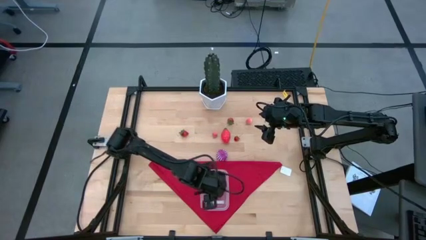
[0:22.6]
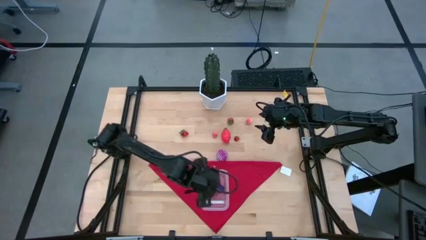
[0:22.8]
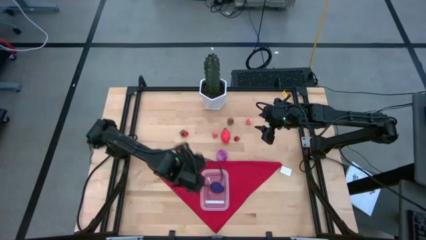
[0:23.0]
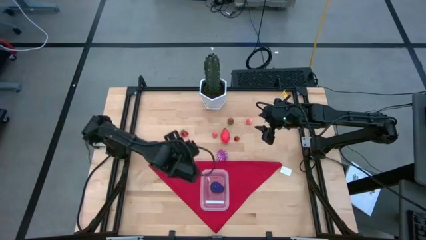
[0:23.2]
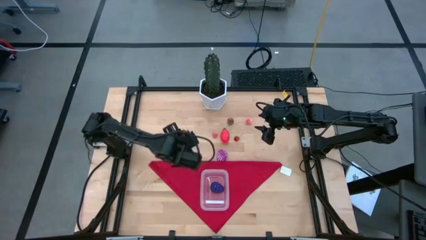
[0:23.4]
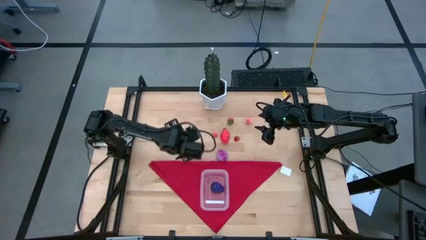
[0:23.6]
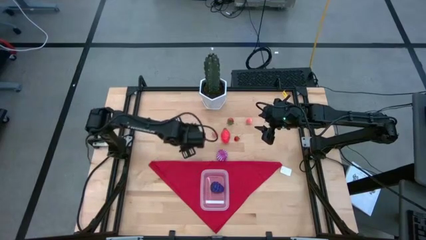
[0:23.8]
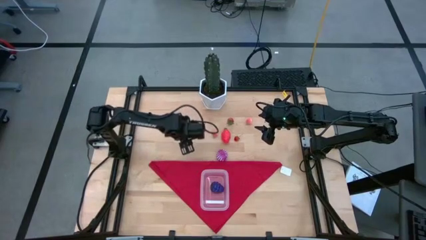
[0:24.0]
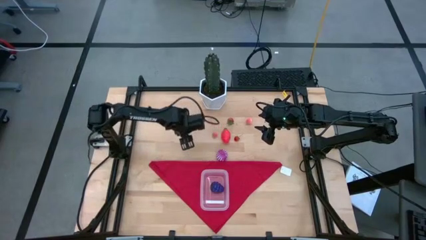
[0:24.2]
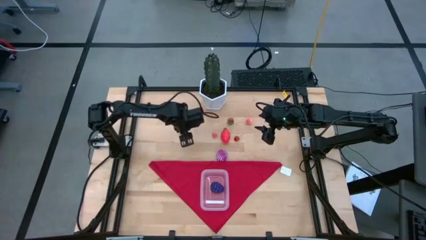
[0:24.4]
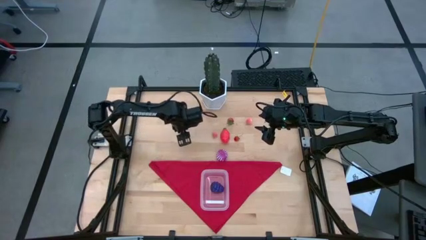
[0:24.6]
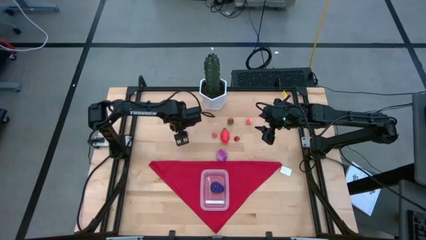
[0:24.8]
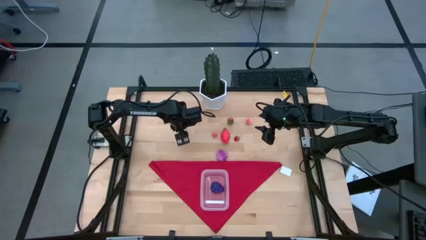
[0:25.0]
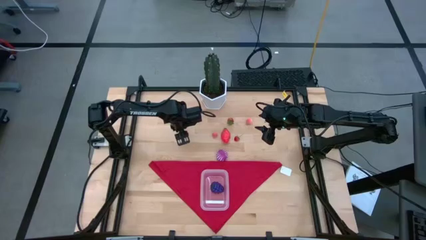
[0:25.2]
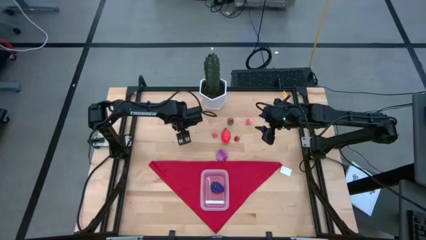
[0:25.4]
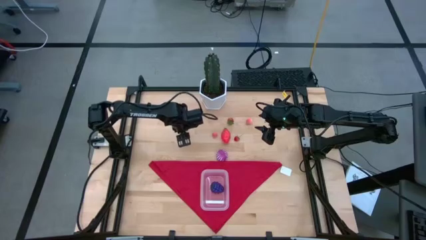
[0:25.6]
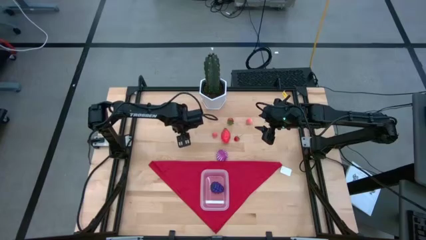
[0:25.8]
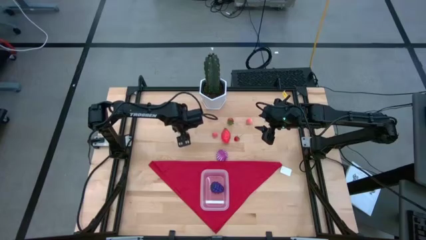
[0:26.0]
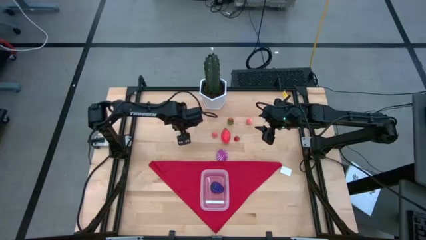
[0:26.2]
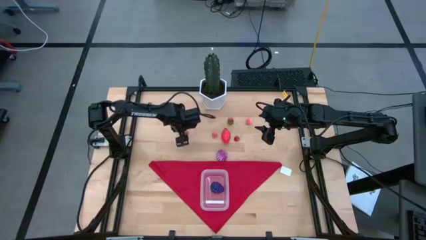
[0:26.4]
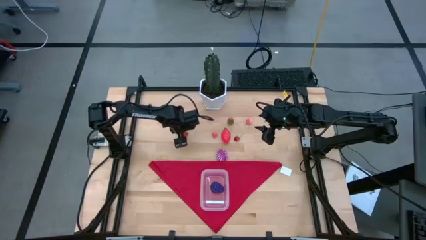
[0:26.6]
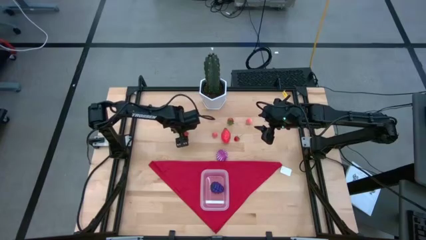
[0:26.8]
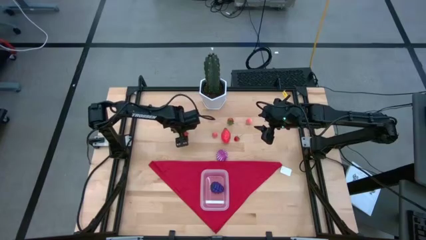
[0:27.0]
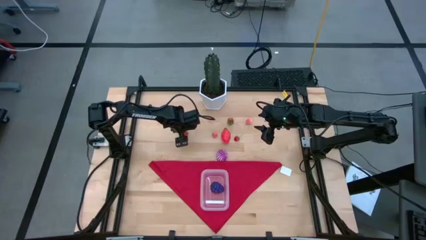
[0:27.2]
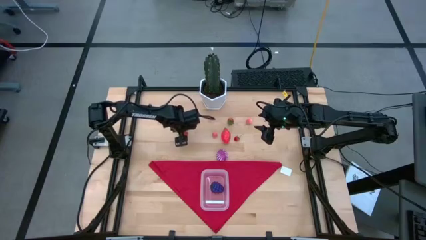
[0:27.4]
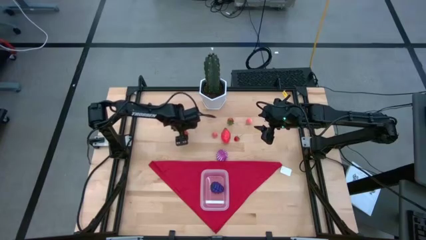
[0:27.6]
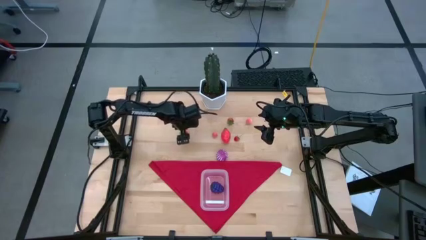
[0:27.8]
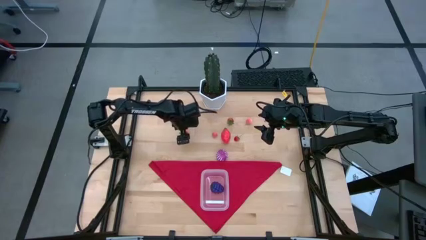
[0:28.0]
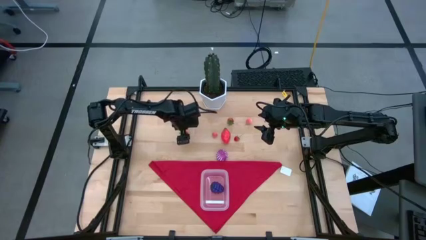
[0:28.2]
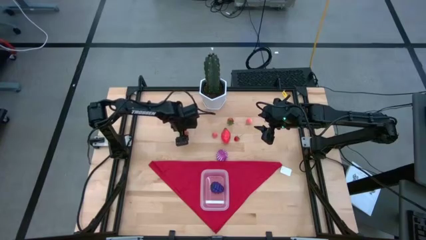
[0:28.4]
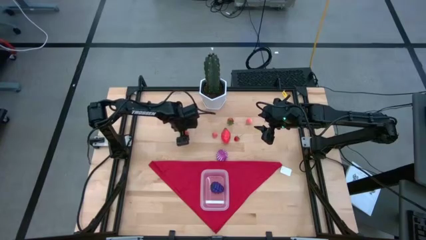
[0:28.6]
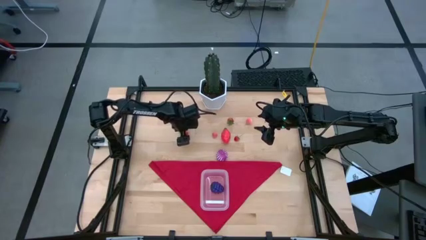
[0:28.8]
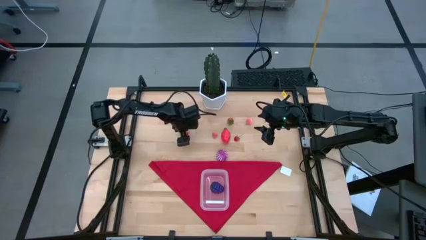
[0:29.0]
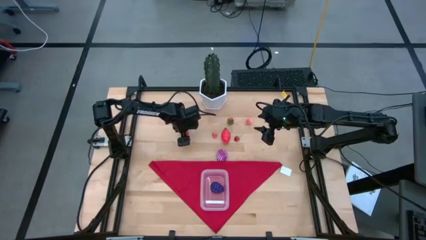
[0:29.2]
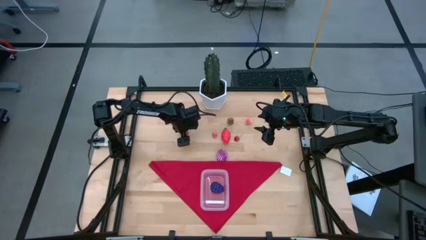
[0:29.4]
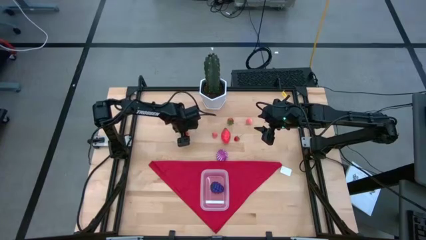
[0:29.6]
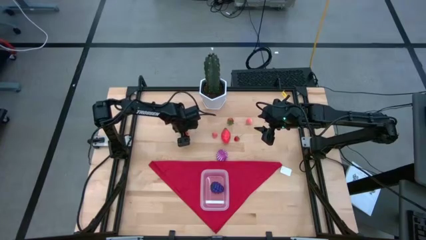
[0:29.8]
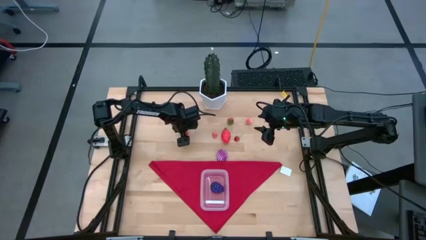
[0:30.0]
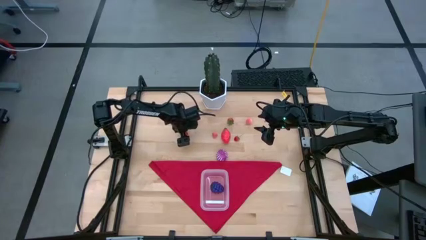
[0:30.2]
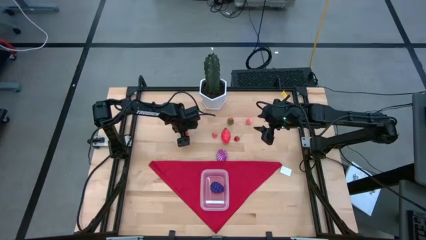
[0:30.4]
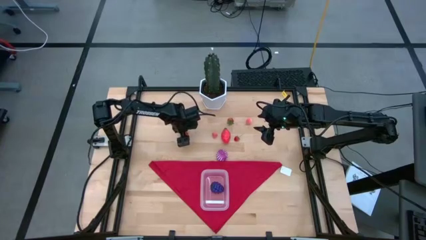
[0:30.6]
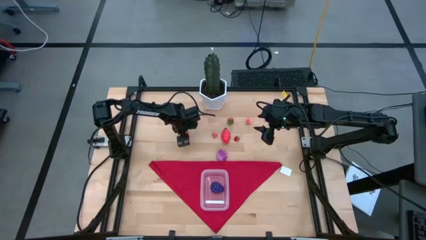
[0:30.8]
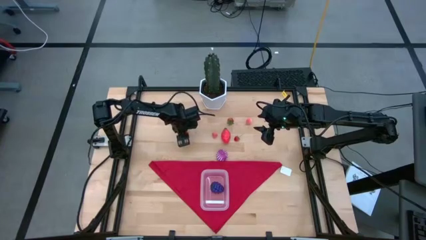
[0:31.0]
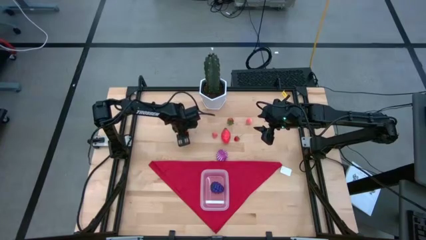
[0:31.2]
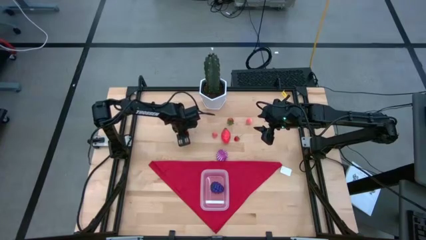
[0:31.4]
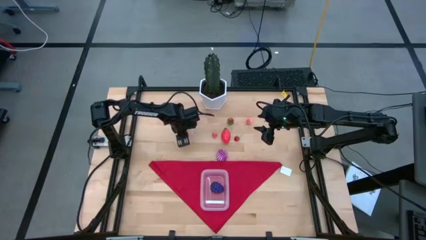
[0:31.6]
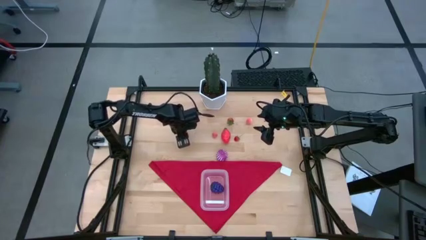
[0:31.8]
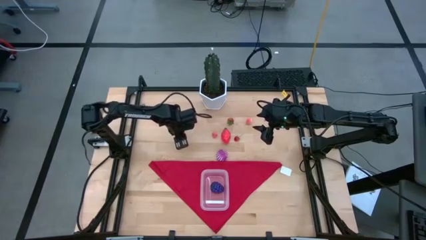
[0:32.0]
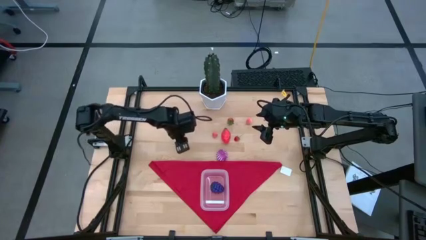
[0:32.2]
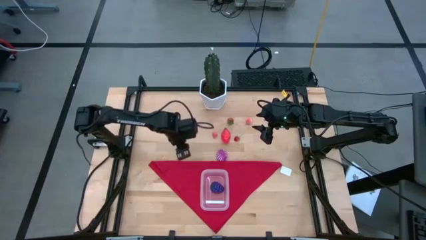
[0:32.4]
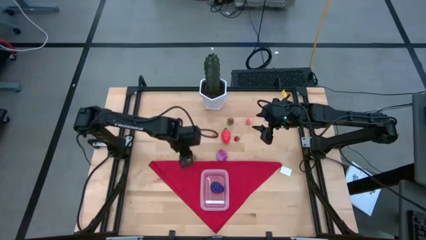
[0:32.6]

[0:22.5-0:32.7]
Task: Pick and placing Produce into tupperware
Put the left strawberry into the transparent bin
